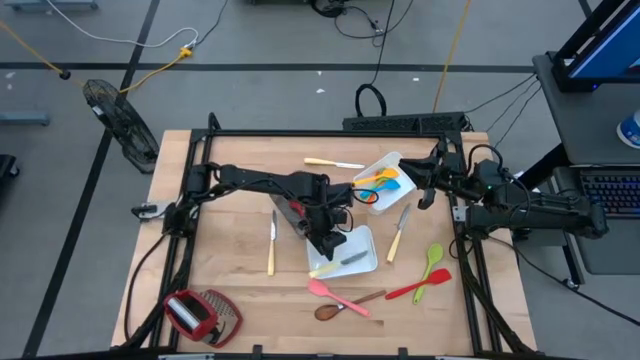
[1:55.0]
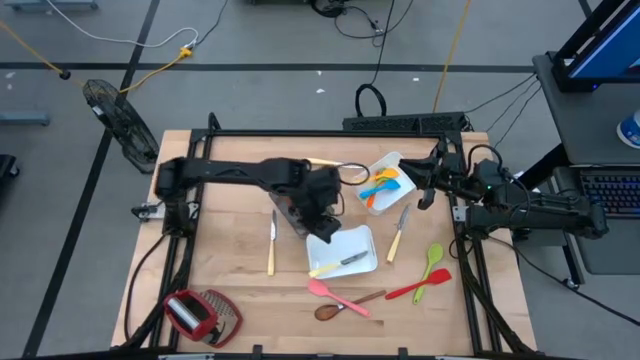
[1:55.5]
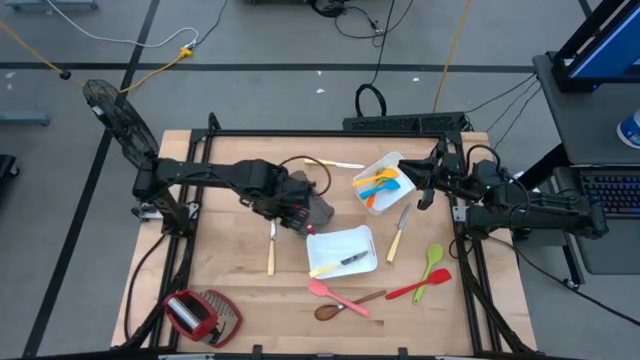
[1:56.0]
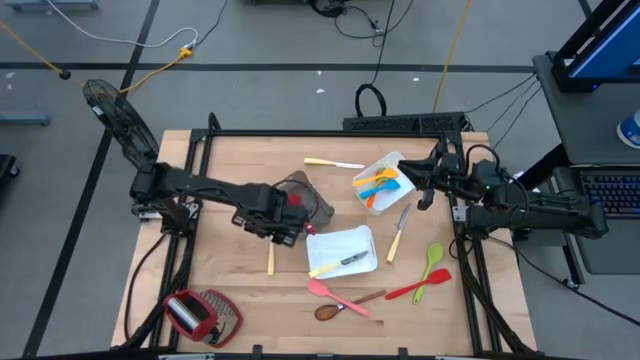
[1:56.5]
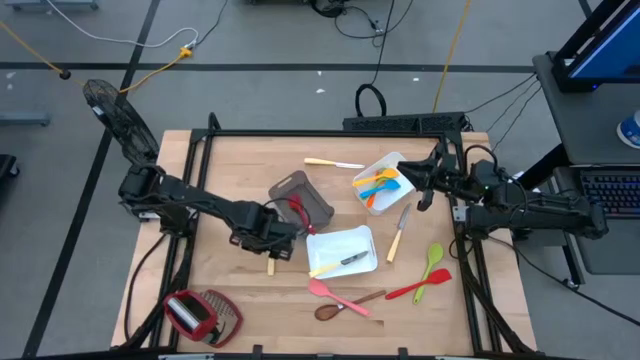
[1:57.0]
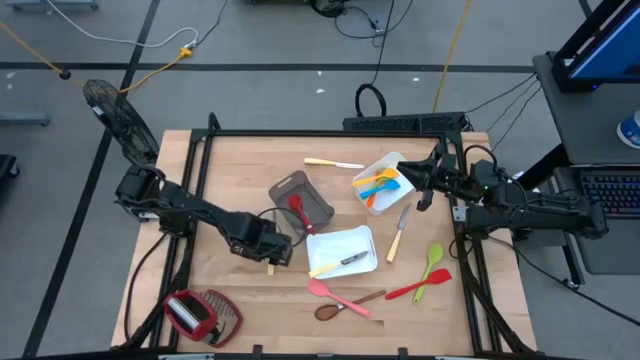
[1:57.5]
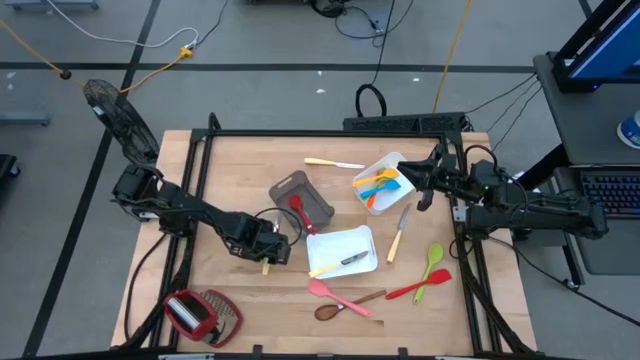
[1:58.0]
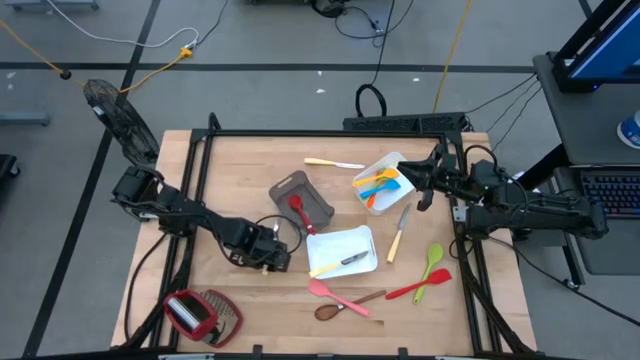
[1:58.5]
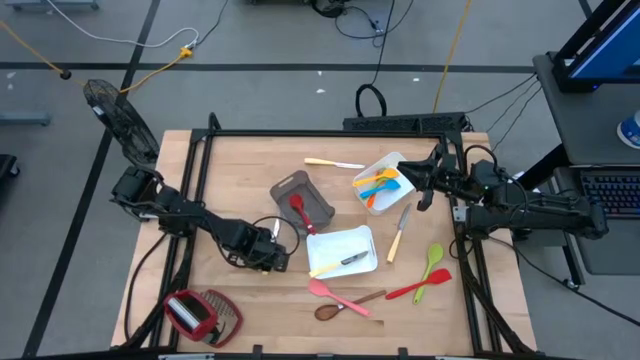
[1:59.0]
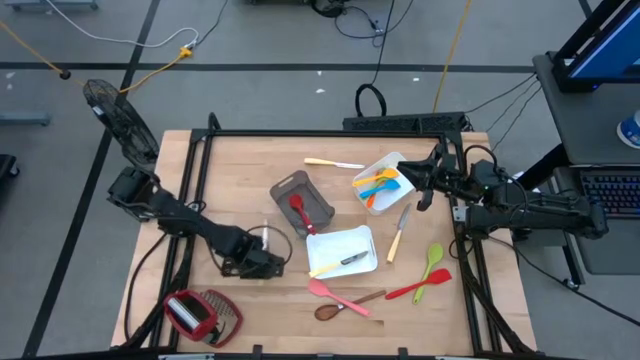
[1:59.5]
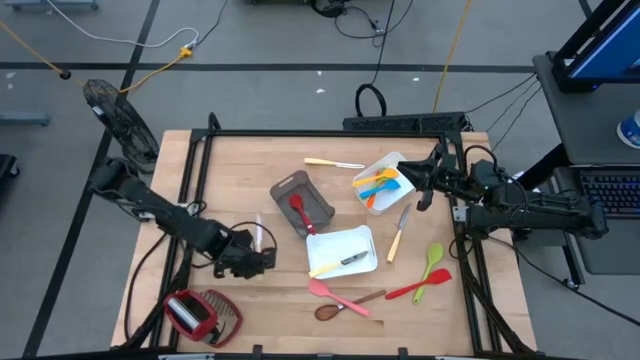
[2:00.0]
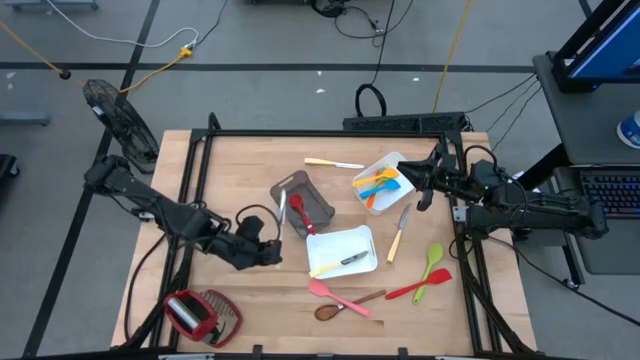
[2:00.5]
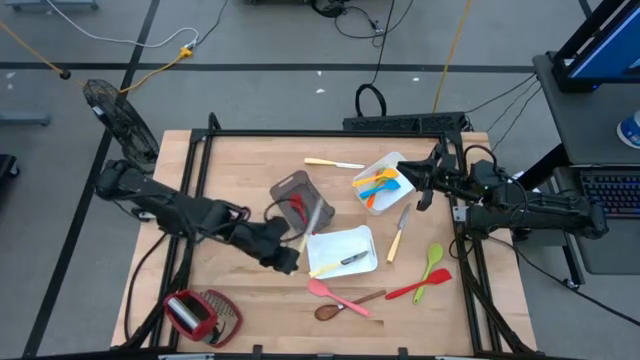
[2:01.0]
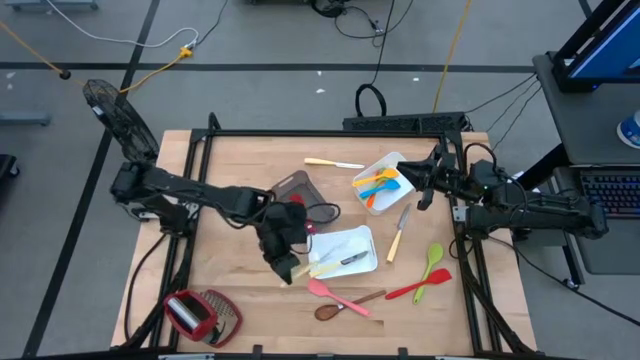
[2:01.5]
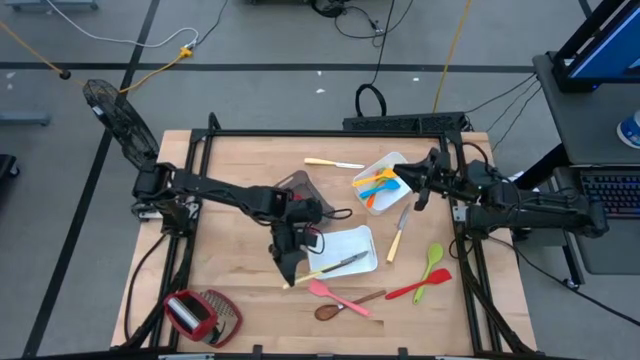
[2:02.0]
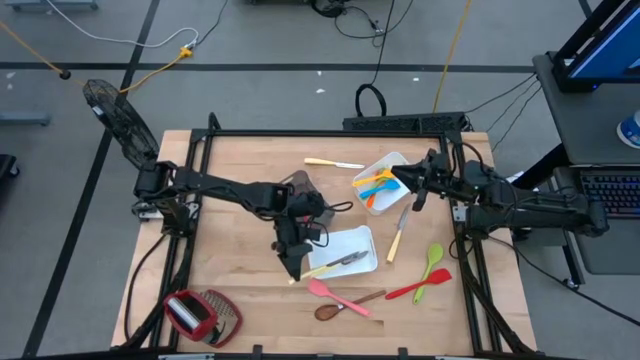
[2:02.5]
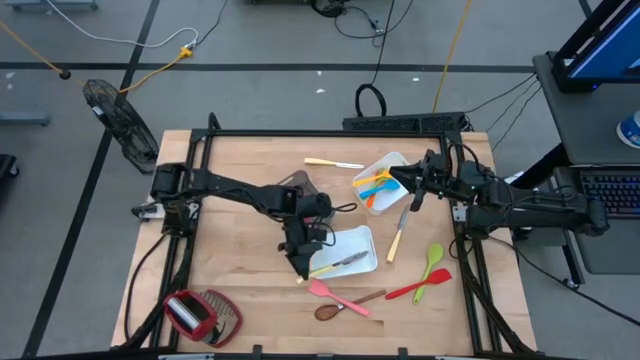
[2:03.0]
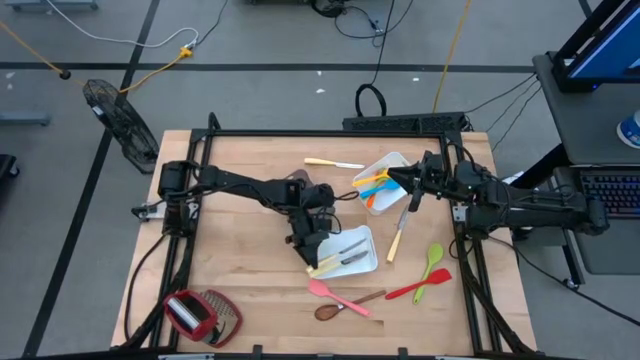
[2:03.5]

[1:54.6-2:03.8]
Task: Pick & Place Kitchen Items
Put the yellow table knife into the bottom white bin

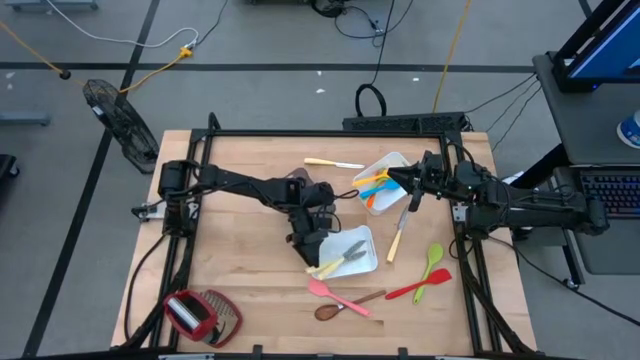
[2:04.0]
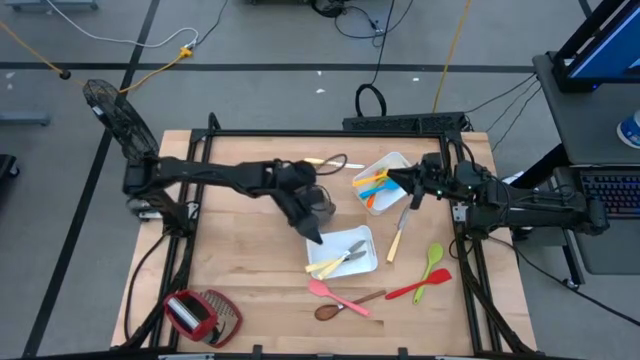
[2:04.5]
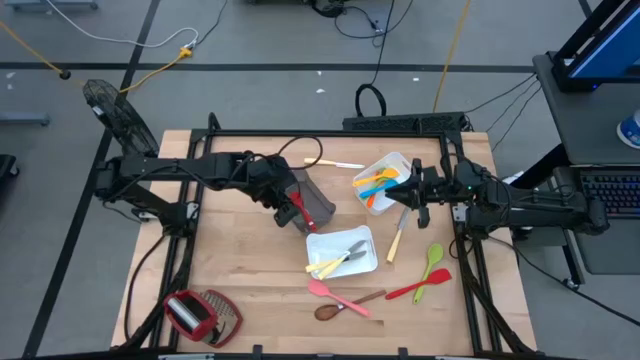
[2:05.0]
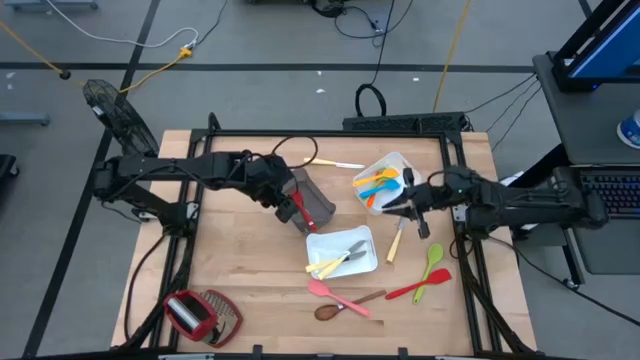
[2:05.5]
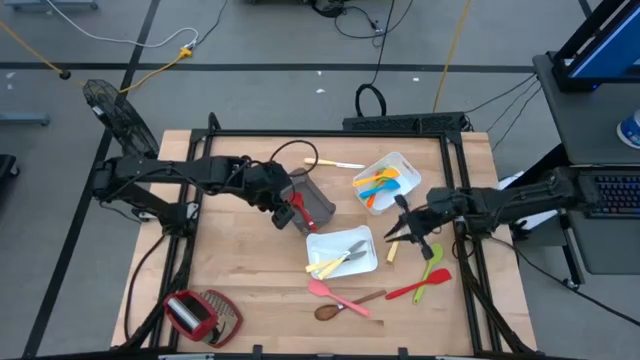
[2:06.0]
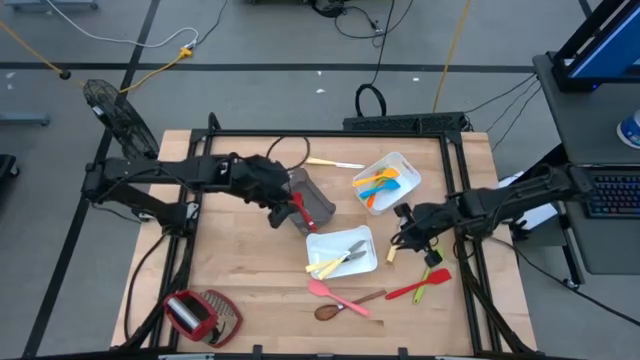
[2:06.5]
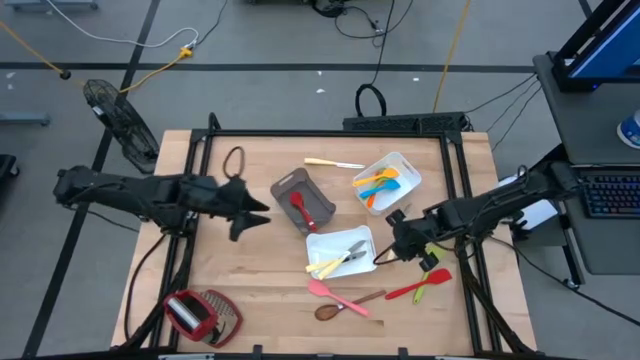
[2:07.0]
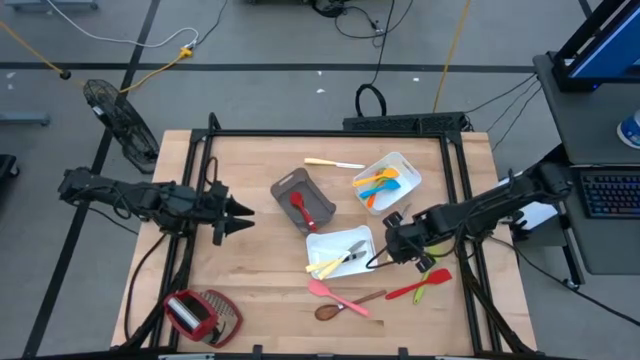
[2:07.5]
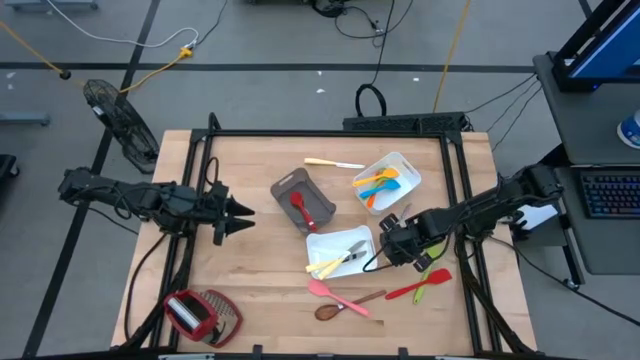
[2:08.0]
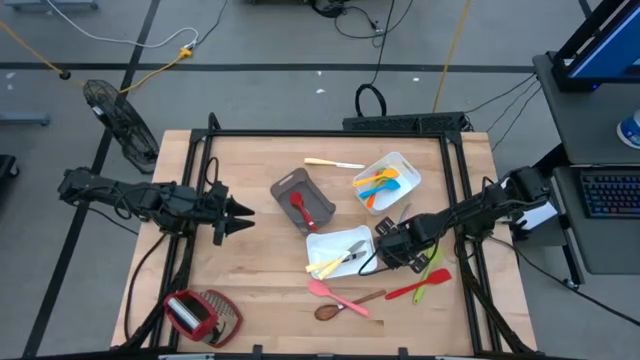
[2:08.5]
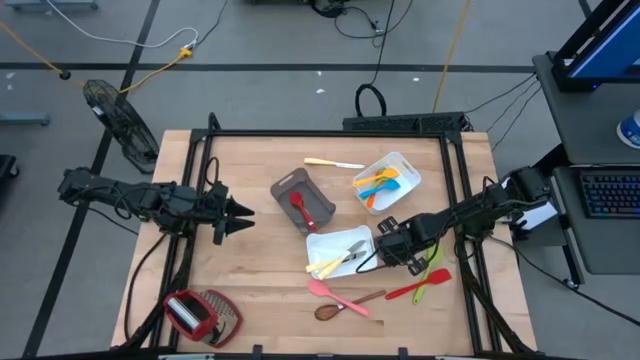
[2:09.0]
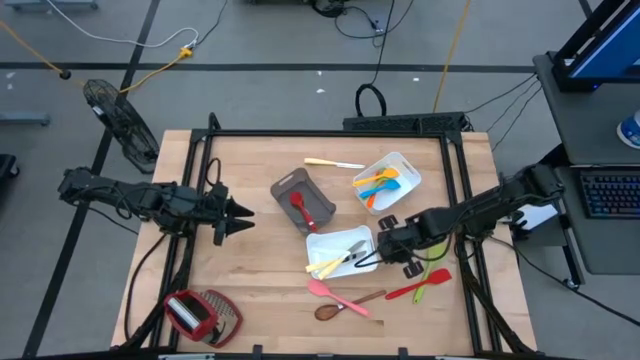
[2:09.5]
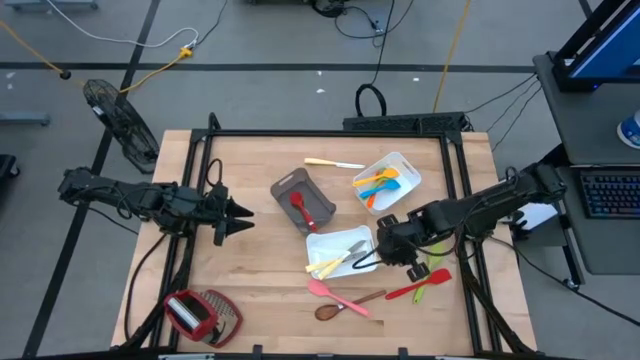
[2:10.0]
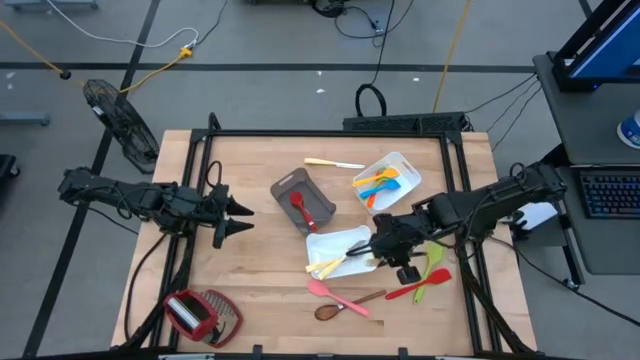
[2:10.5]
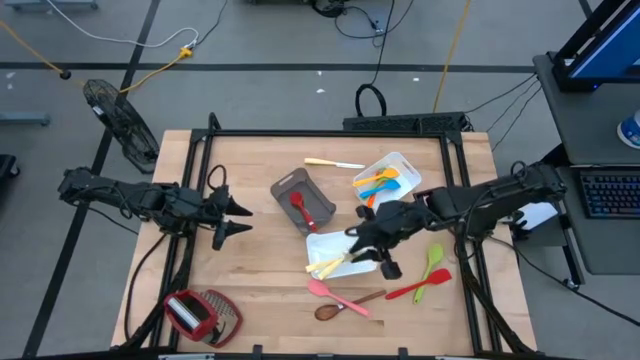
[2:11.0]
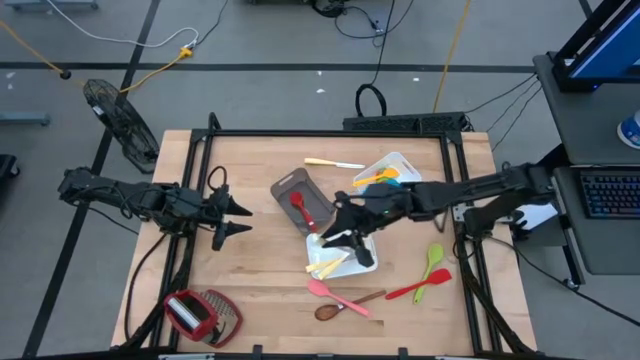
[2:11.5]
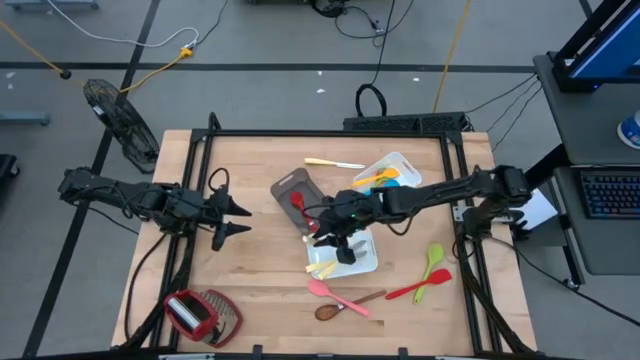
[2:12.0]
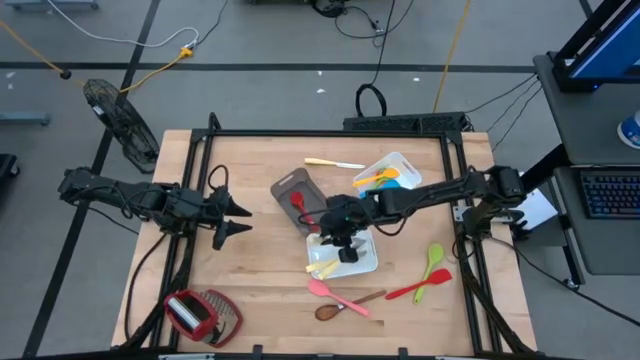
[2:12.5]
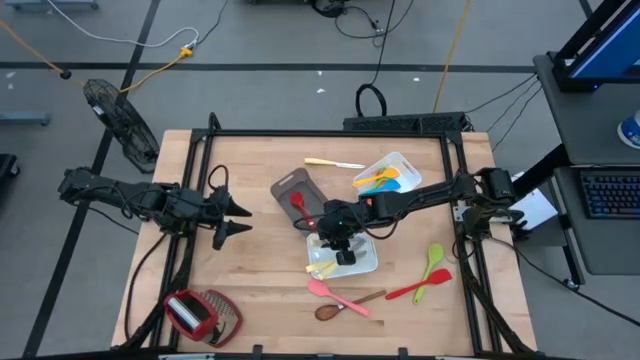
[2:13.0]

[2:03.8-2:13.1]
Put the yellow table knife into the bottom white bin
